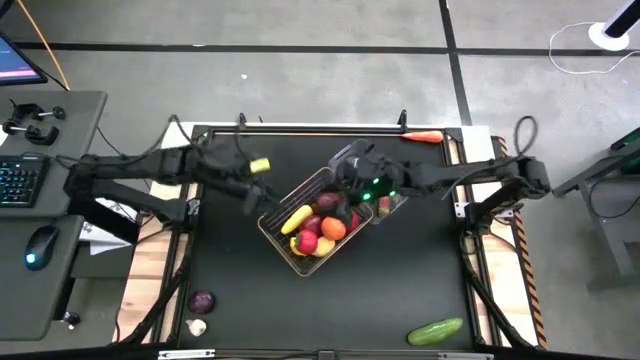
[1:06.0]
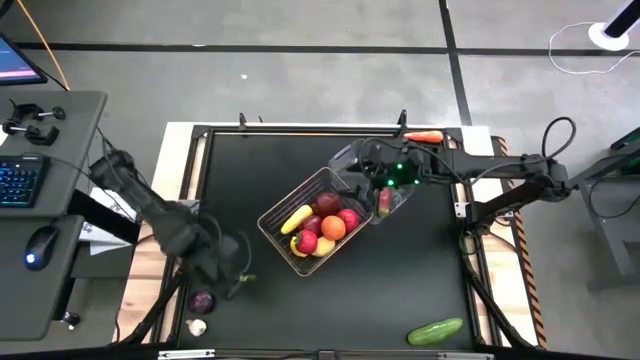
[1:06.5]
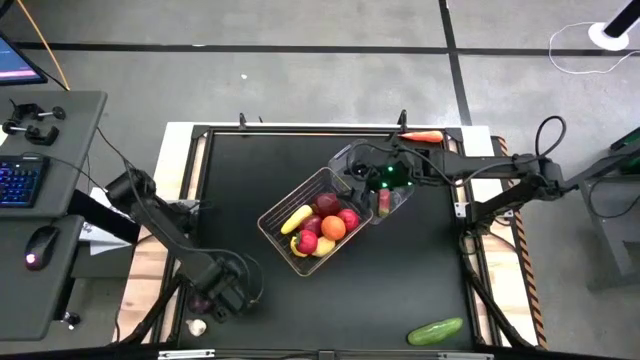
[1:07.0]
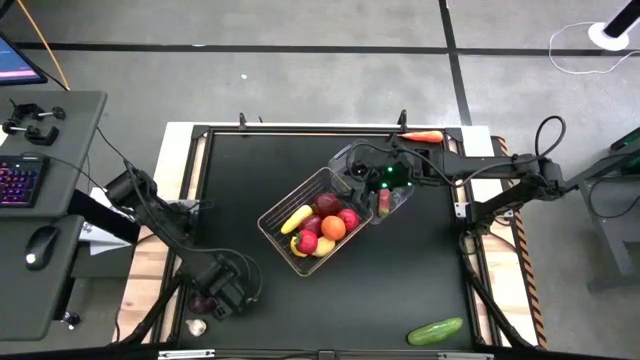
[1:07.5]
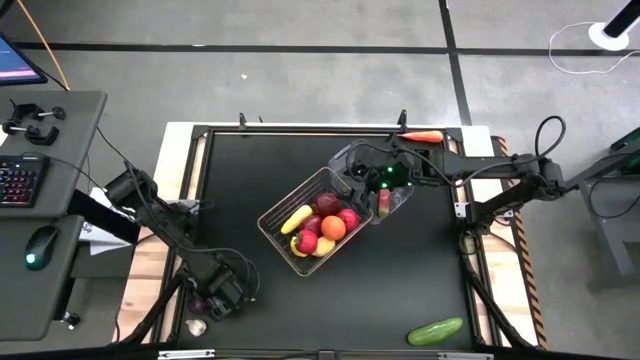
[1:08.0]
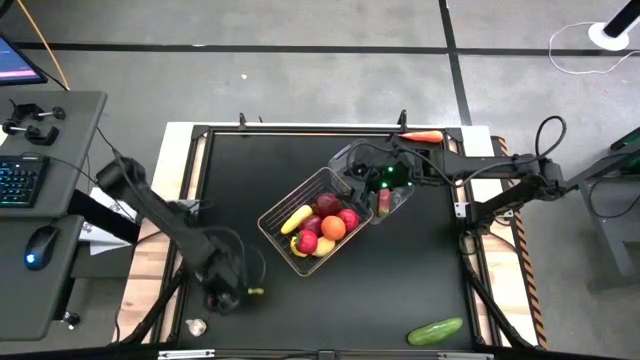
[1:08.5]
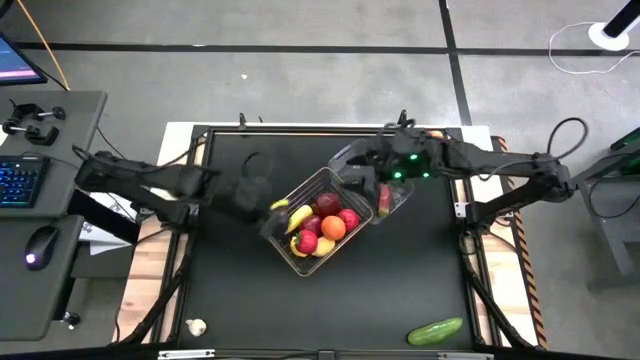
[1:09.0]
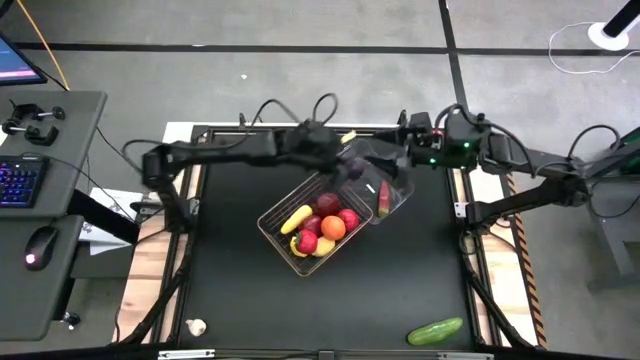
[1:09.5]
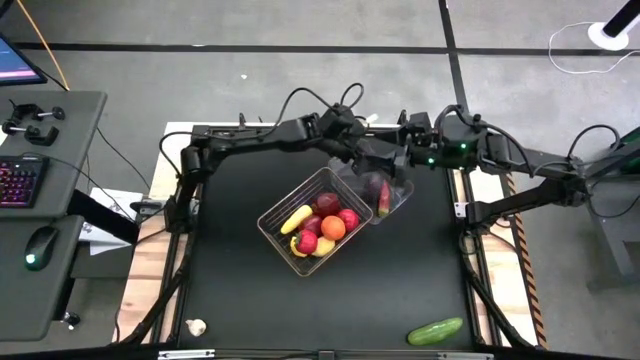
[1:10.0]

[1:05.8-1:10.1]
Task: Sort produce into baskets
Put the onion into the transparent bin

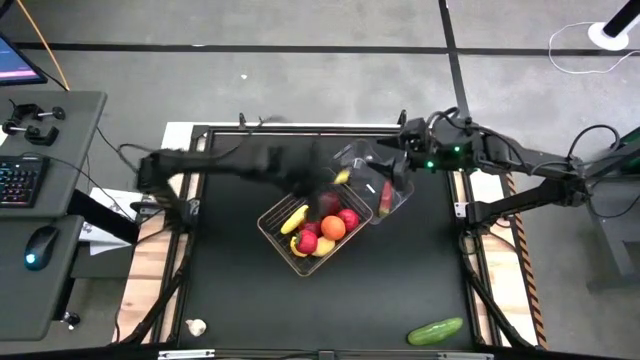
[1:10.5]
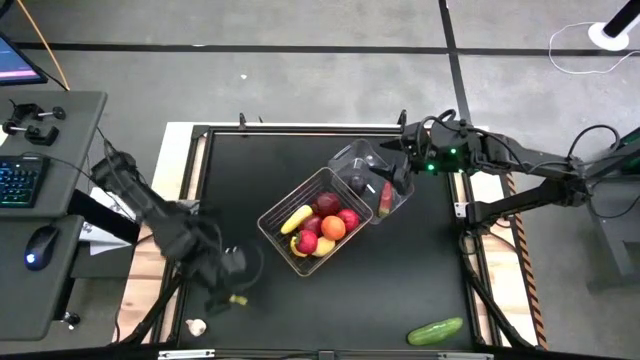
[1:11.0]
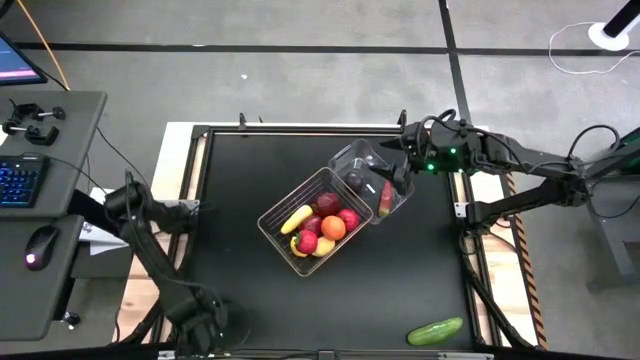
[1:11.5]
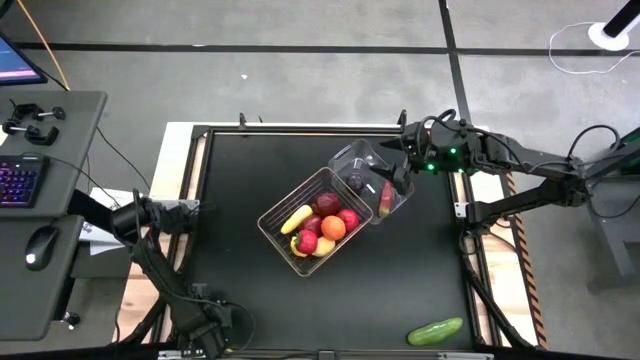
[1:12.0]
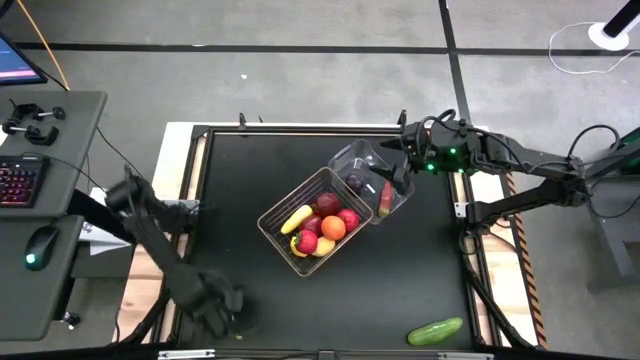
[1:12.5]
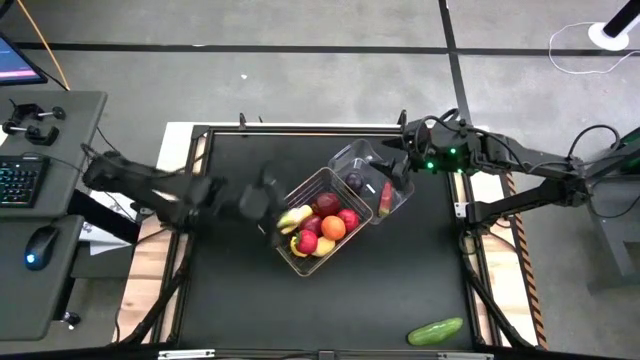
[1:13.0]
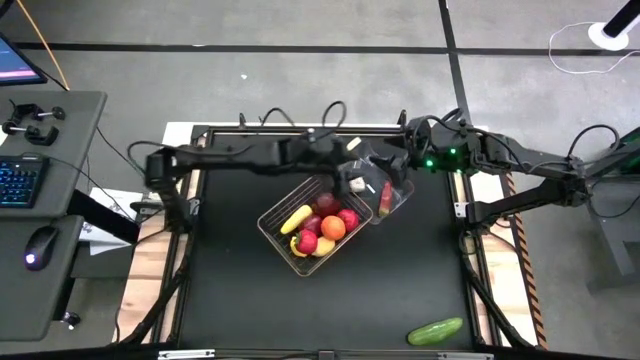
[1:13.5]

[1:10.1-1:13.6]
Put the garlic into the transparent bin

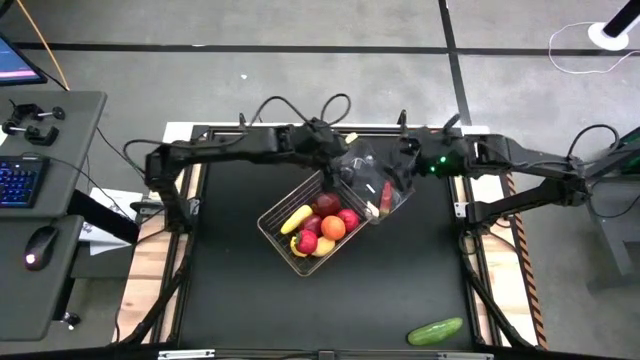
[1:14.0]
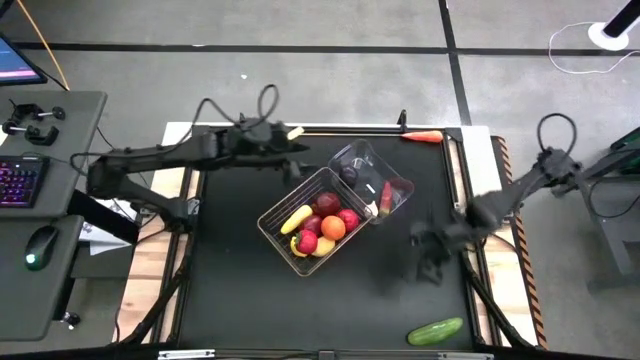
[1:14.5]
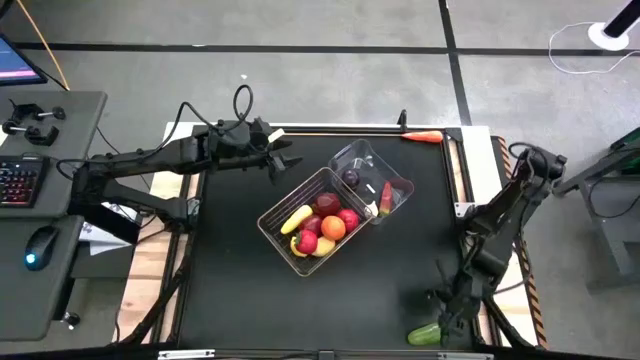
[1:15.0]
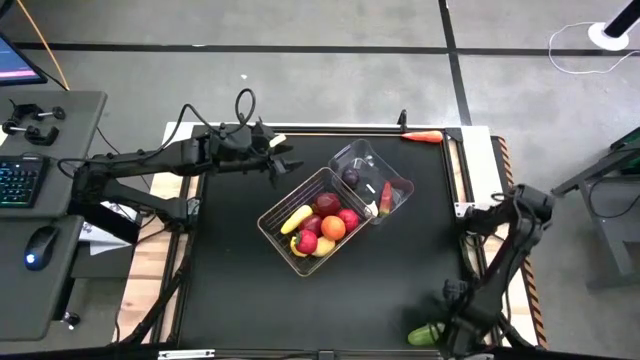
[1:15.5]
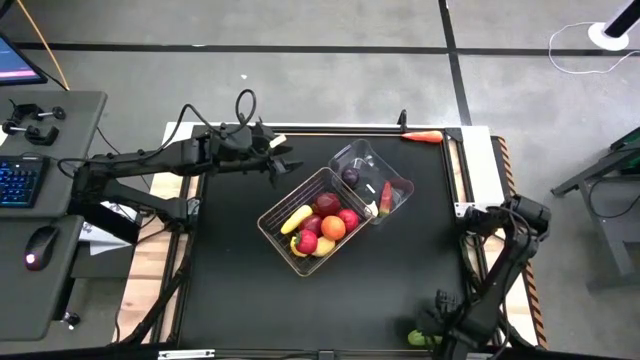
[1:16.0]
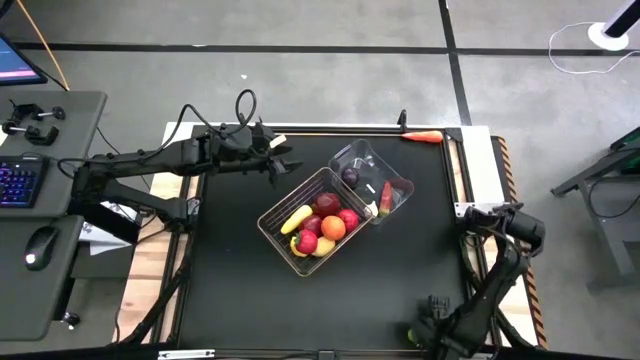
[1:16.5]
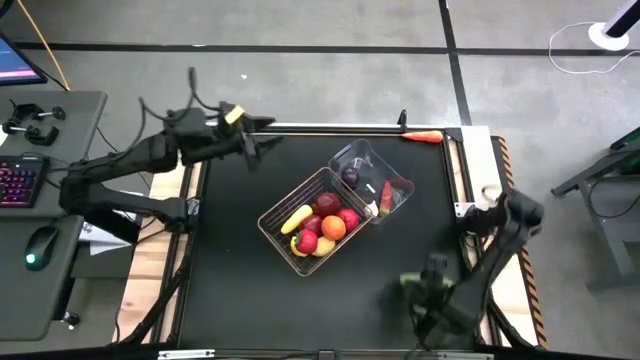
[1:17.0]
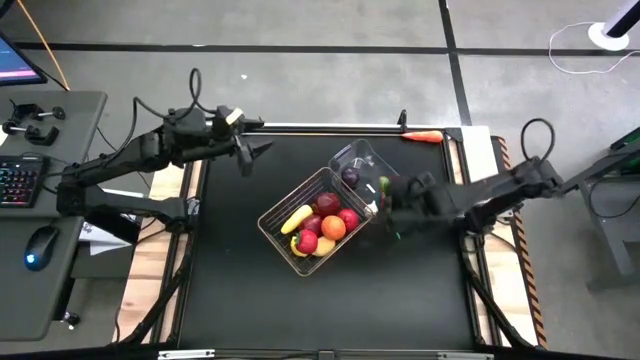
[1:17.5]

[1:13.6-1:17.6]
Put the cucumber into the transparent bin

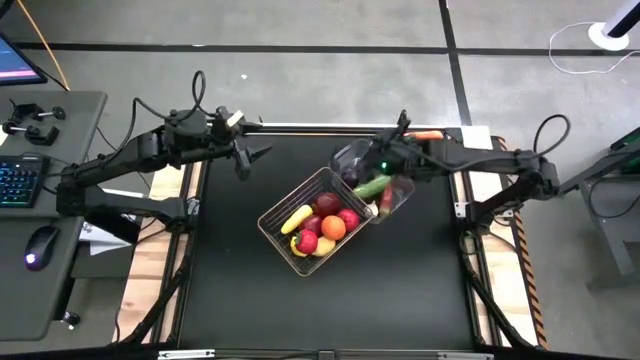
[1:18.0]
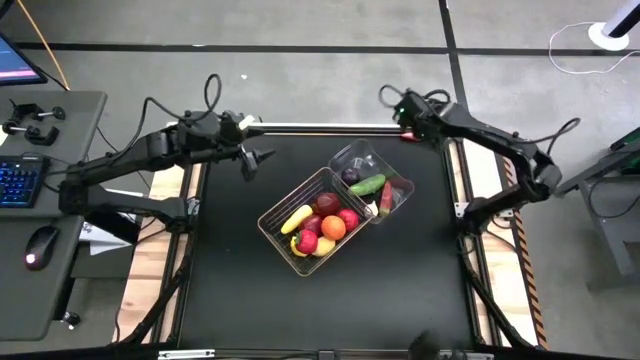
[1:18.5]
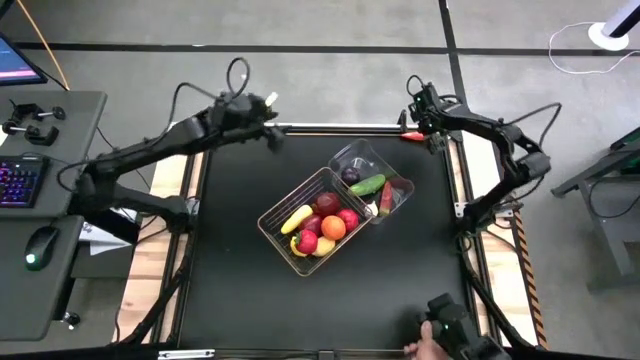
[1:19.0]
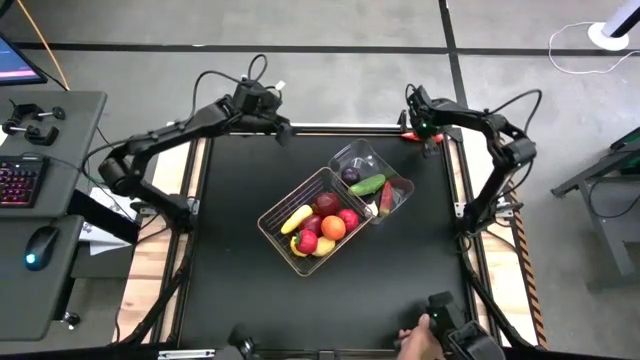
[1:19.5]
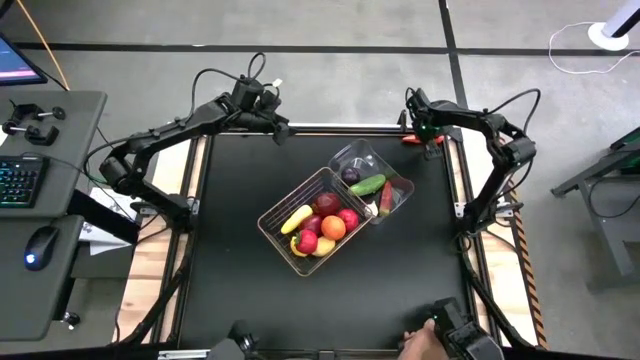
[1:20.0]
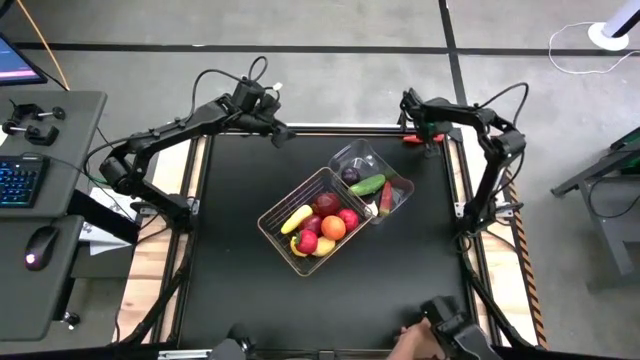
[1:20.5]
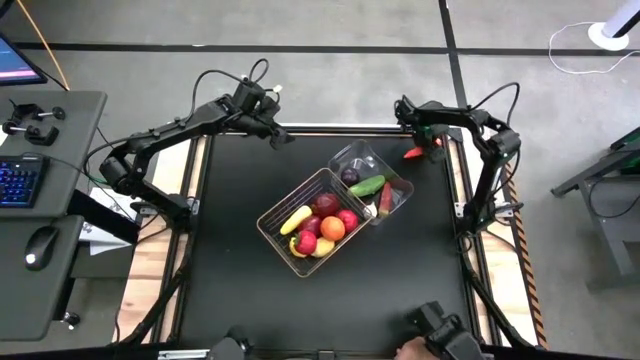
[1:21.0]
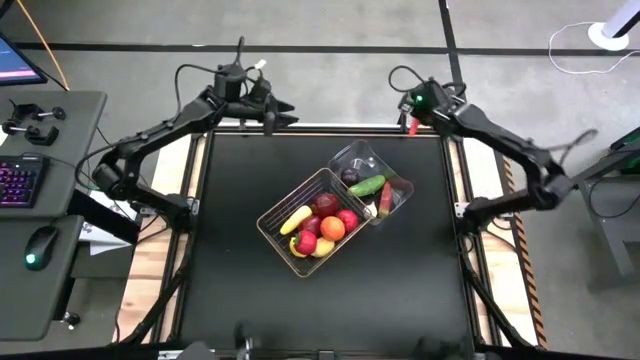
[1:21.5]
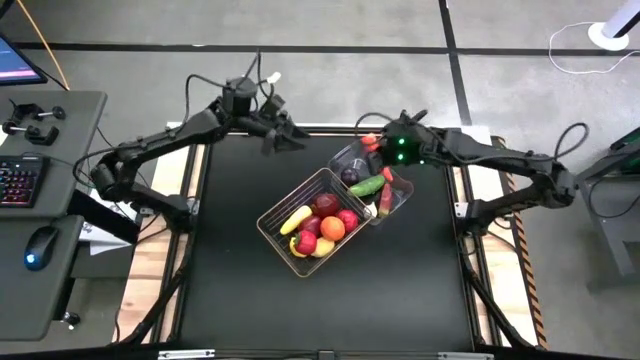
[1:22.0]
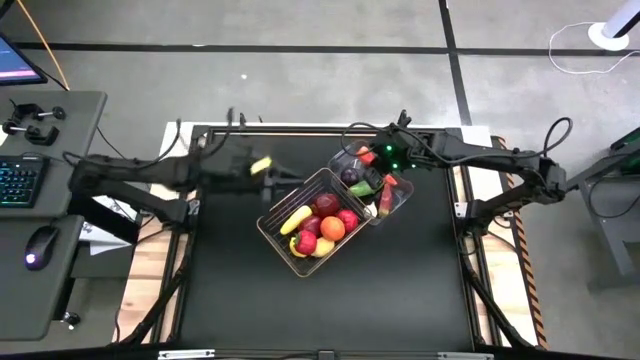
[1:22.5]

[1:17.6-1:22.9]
Put the carrot into the transparent bin
